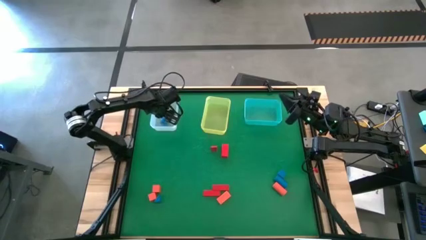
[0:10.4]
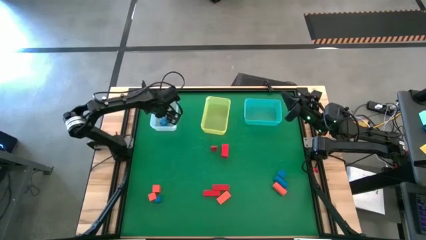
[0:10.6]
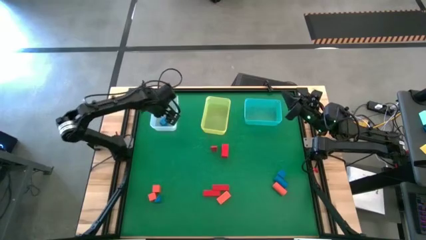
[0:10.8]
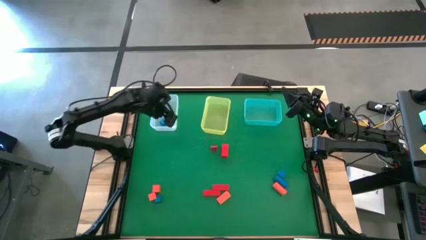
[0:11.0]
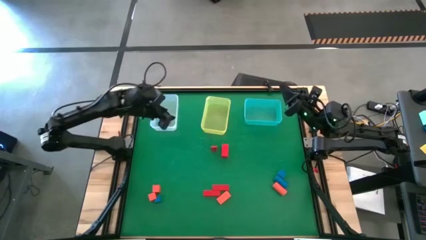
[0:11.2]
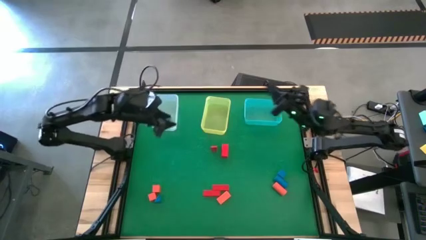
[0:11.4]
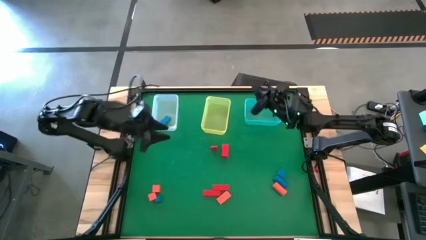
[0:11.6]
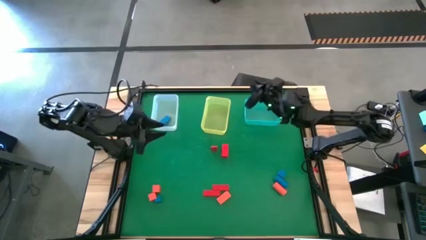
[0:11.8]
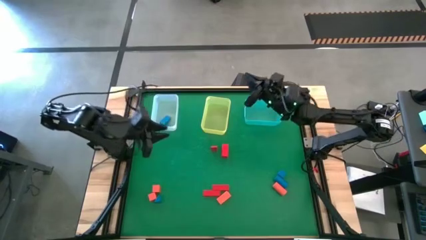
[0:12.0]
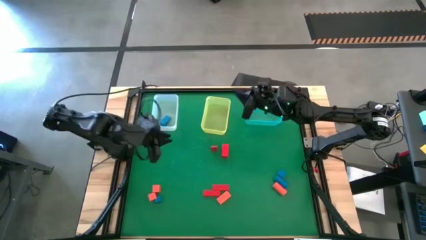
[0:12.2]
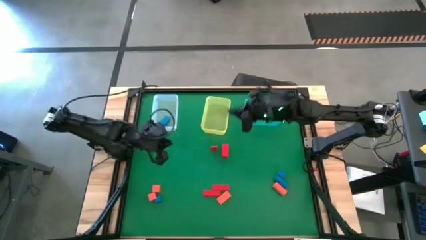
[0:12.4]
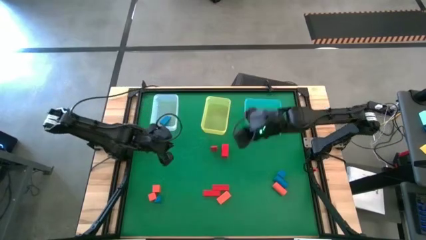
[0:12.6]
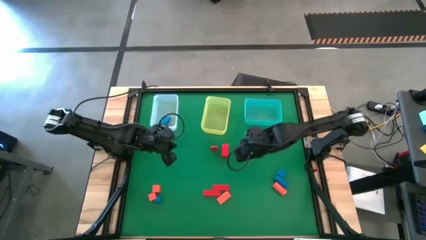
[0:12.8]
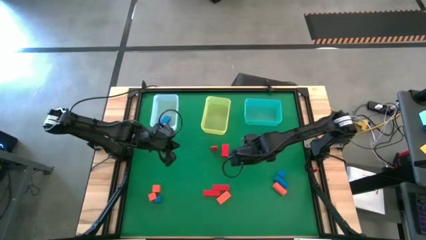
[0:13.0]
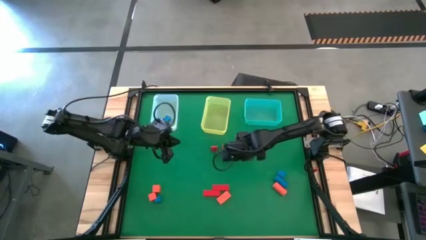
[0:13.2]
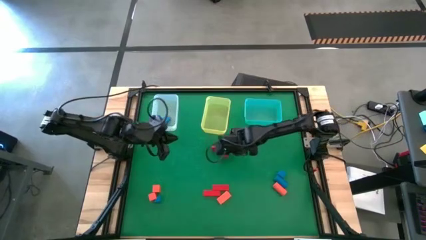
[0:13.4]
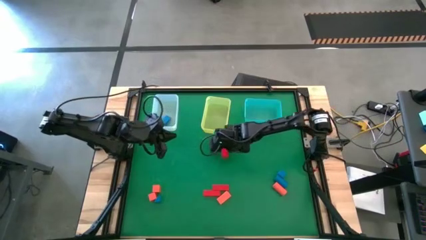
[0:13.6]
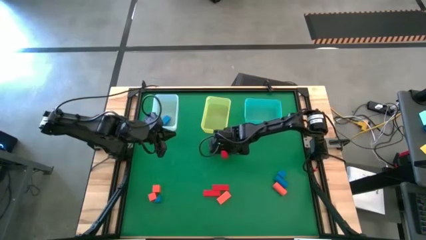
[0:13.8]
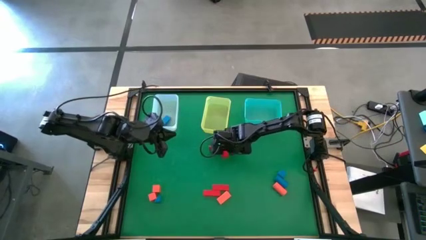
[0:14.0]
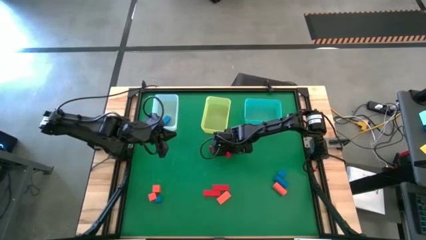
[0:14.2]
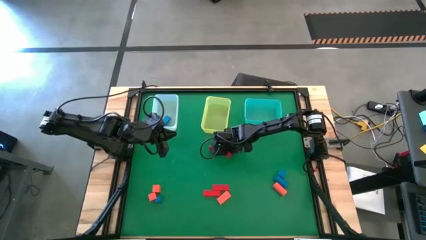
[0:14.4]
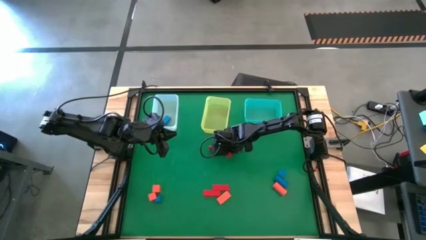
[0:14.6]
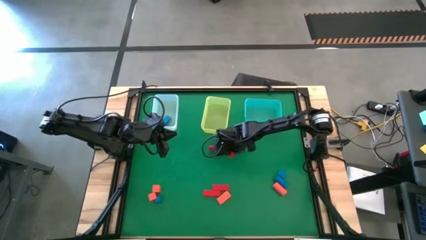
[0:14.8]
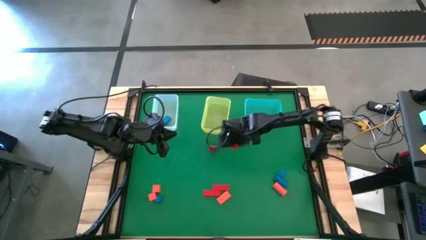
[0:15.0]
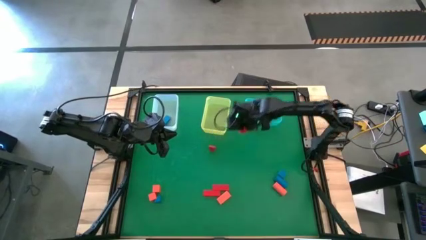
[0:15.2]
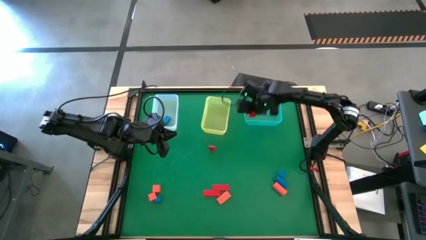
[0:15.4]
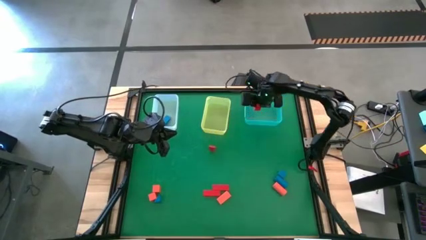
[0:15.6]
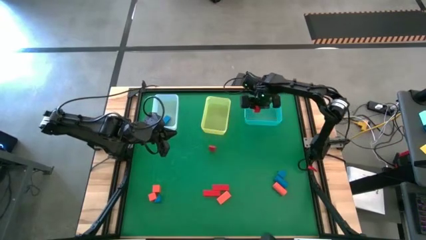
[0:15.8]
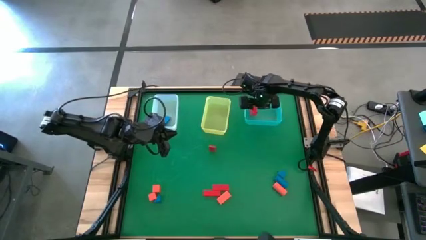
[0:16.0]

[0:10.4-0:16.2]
Task: Sort & place blocks by color
Put the red block into the blue bin

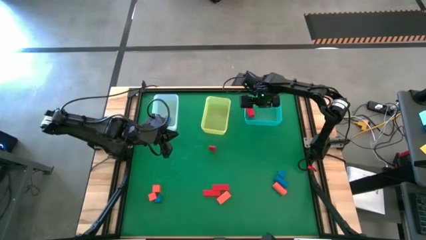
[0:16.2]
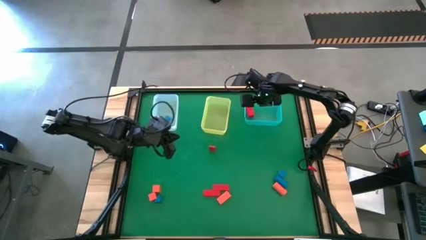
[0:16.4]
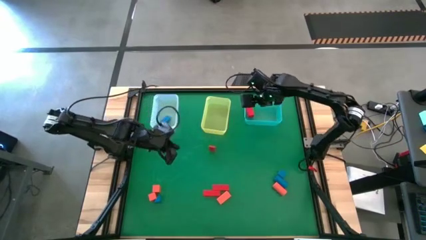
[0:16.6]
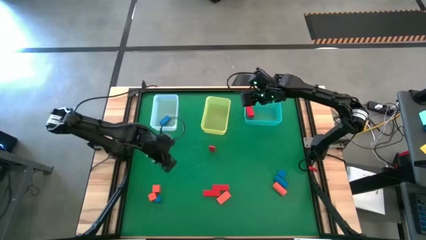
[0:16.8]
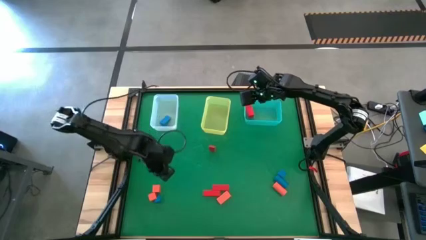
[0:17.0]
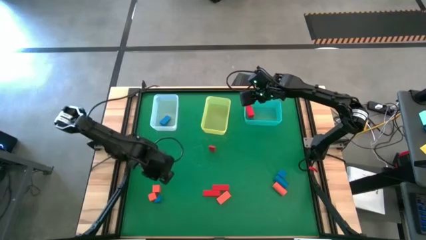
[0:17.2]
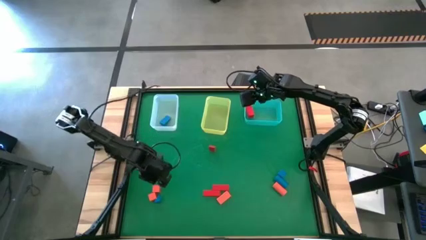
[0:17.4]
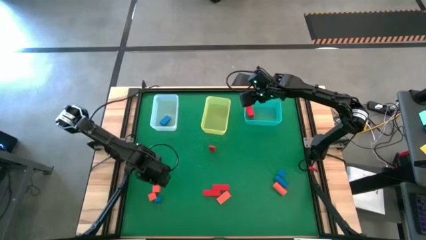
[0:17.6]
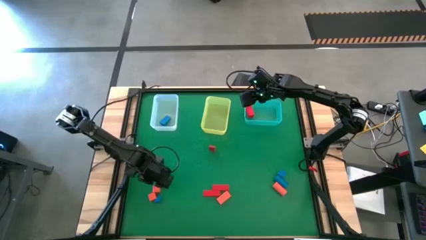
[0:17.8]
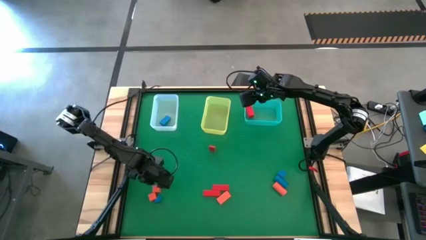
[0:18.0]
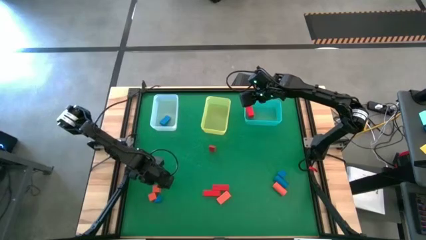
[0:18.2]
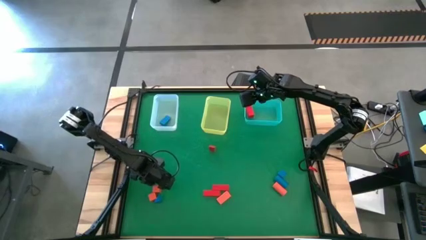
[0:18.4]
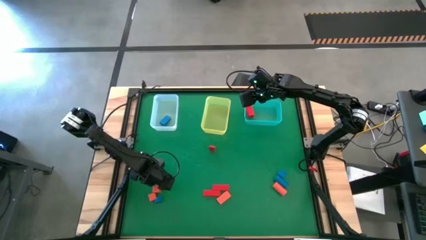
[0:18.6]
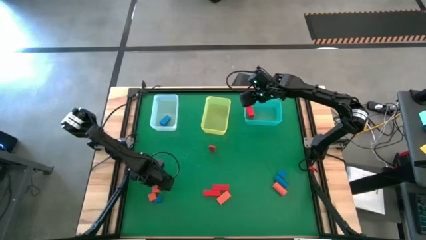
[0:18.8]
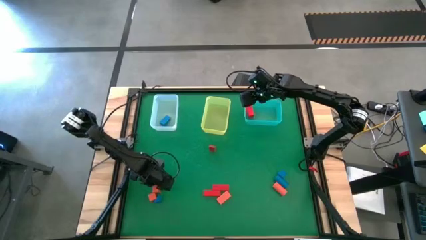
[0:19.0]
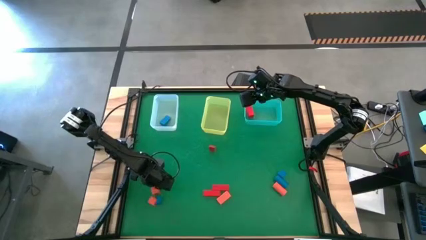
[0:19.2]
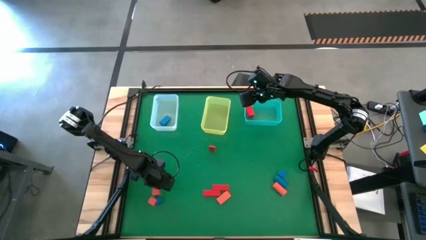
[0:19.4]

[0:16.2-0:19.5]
Put the orange block into the yellow bin

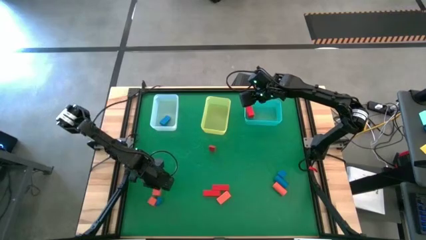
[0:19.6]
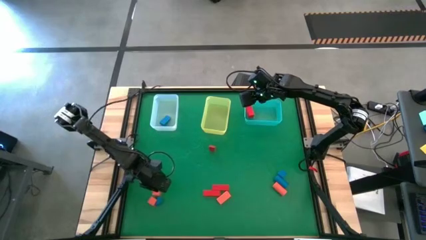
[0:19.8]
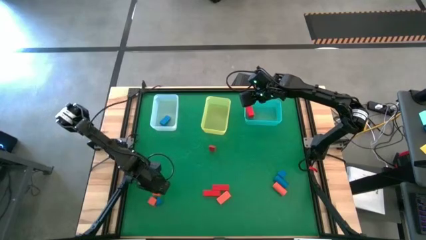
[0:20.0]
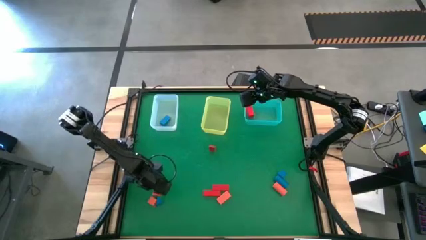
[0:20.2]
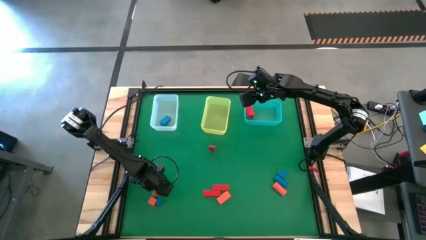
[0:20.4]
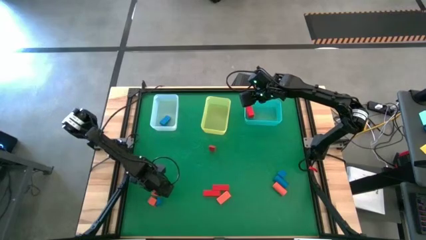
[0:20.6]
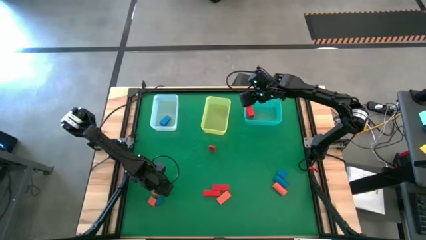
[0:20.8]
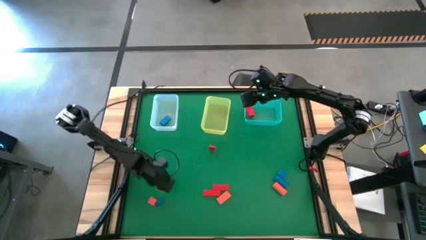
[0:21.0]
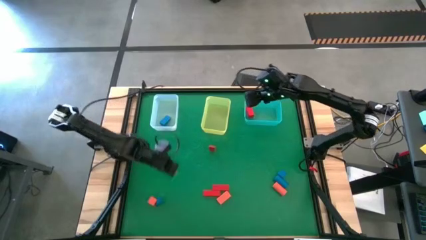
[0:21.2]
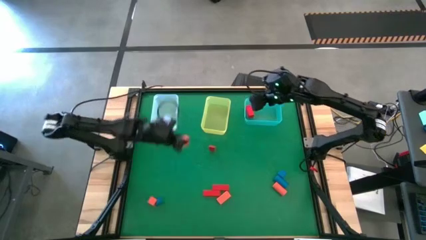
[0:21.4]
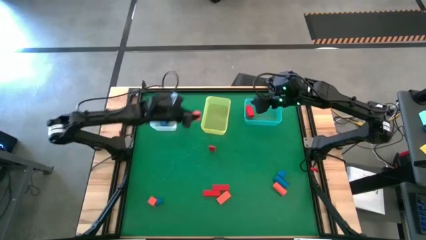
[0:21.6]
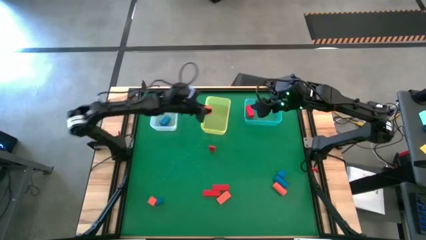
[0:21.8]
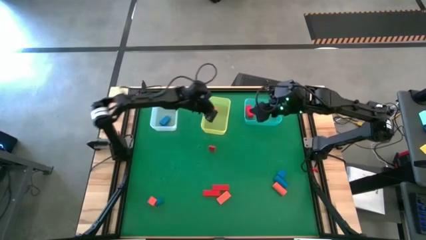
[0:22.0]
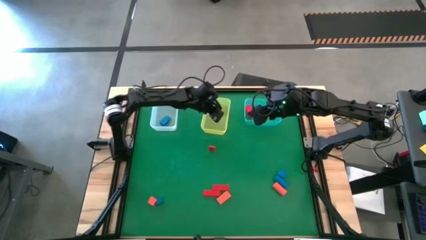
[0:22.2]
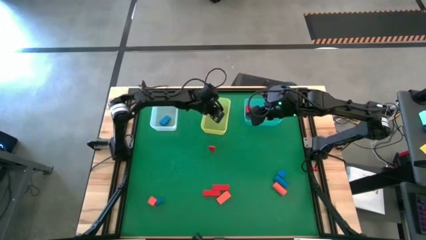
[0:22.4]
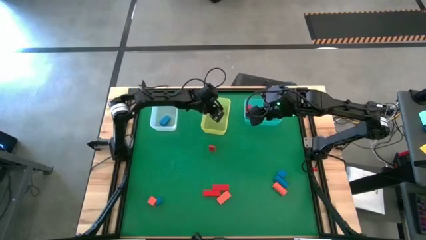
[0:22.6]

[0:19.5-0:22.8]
Put the orange block into the yellow bin

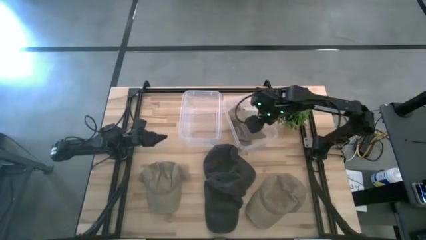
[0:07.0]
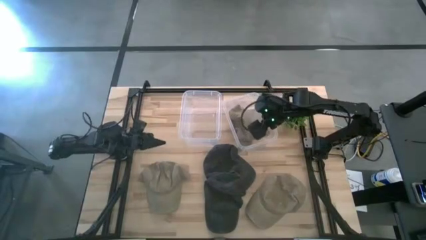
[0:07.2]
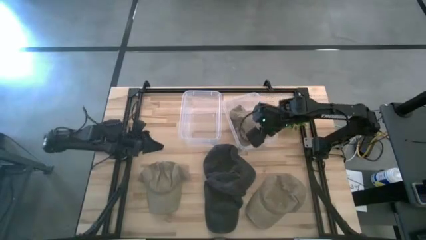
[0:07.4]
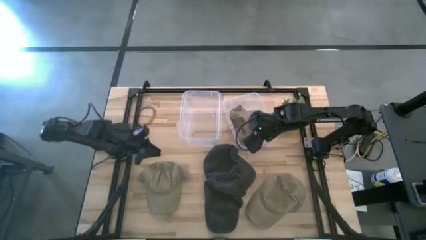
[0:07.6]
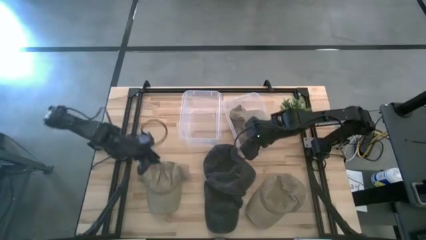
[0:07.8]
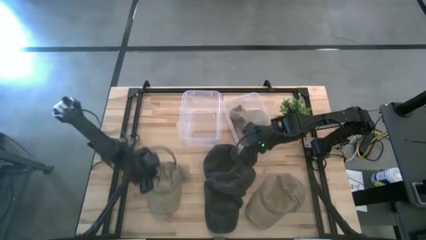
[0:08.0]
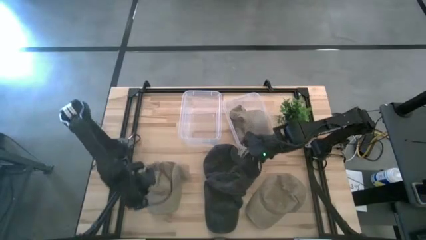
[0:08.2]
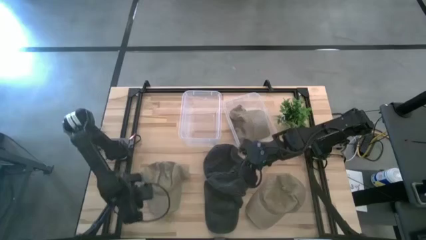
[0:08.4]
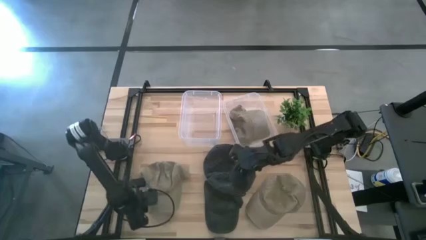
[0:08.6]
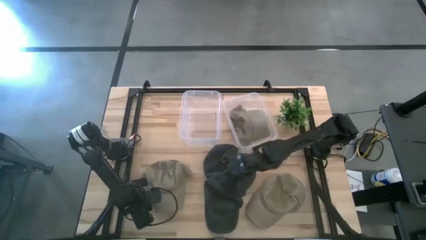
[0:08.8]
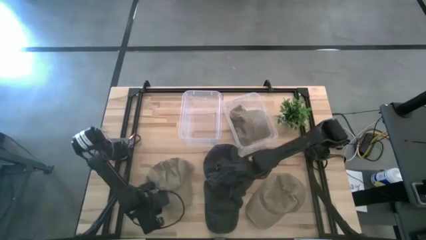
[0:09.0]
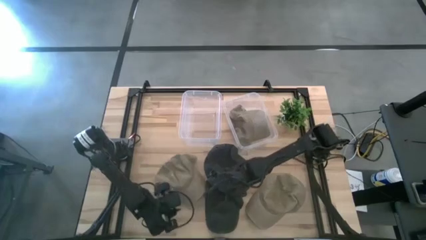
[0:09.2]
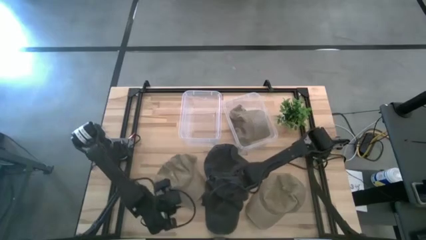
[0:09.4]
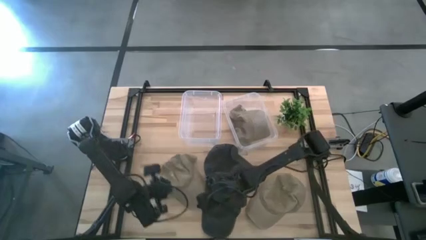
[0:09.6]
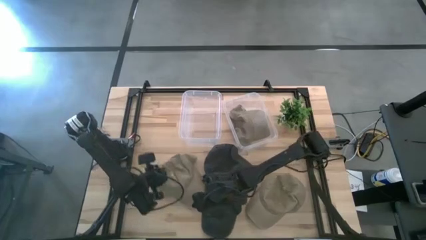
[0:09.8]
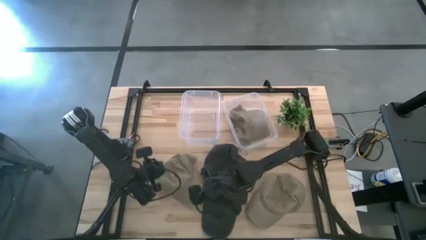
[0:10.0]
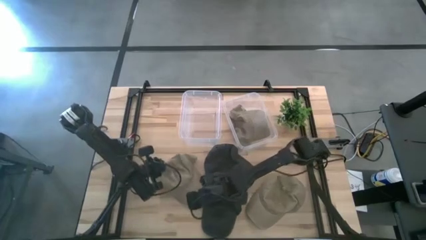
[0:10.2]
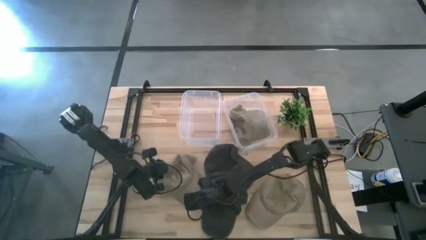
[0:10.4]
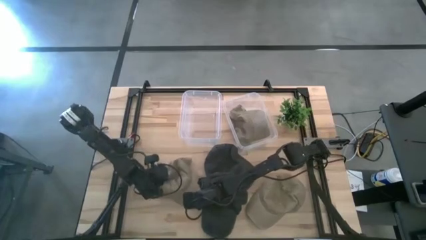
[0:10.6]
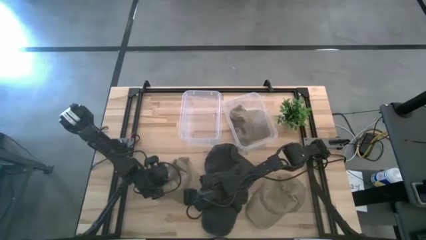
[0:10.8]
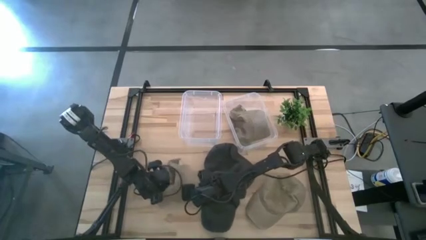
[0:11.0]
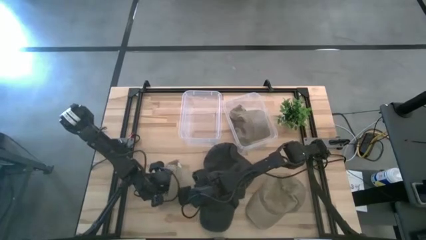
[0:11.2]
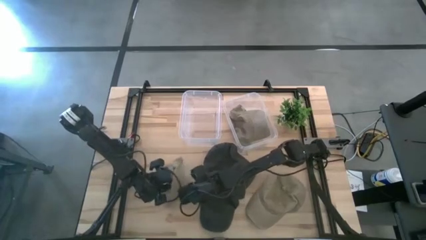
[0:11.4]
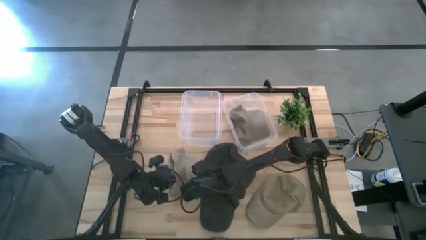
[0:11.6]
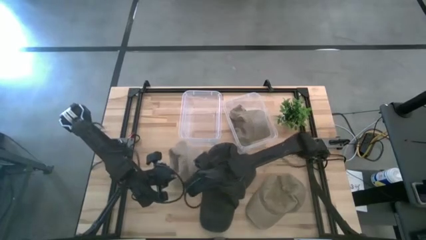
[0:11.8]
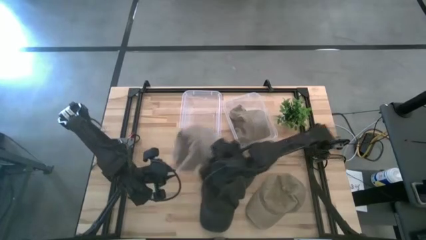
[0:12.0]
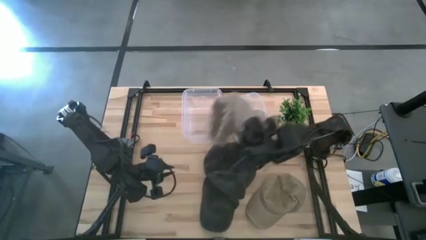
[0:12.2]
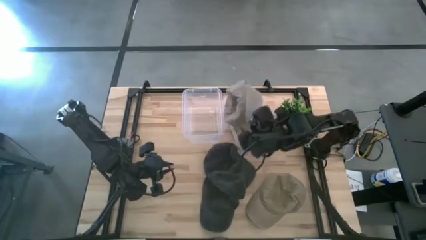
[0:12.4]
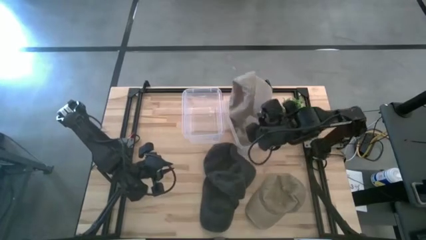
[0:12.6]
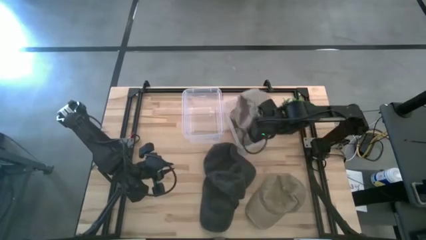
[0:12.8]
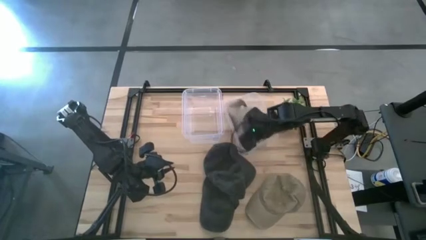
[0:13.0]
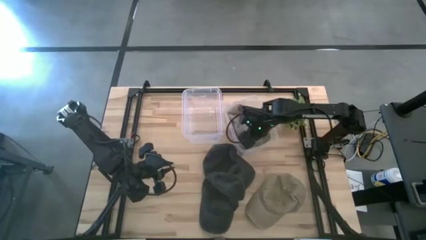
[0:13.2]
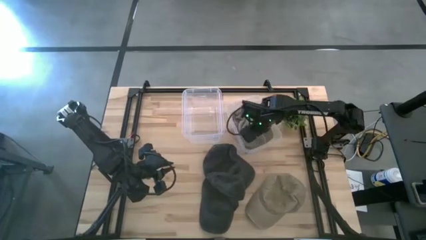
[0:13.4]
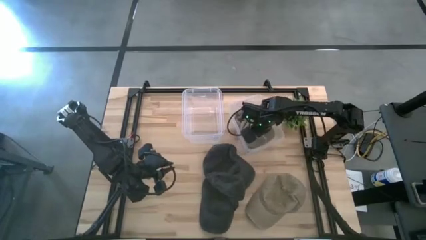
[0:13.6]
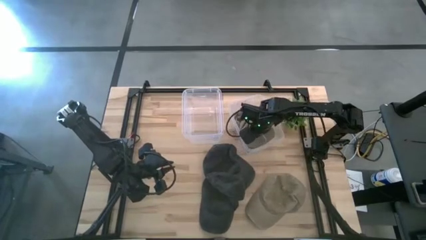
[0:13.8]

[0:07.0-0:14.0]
Task: Pick & Place hat
Put the left brown cap into the right transparent bin
